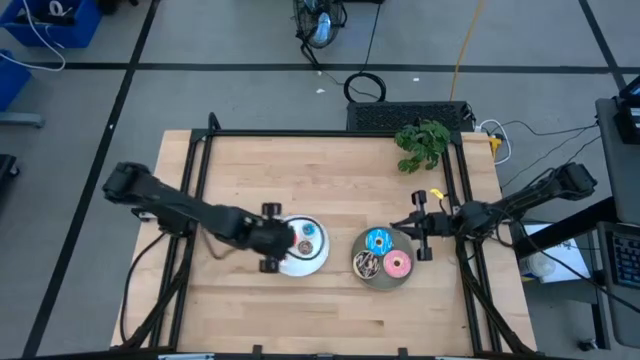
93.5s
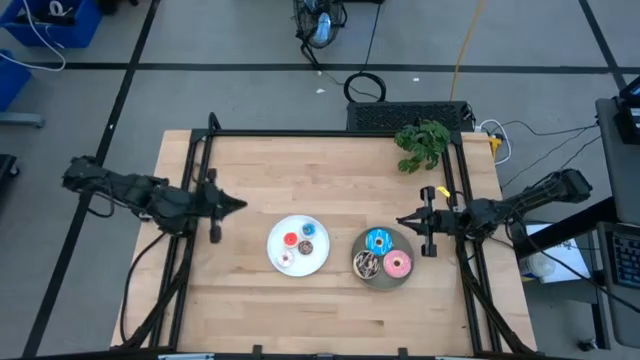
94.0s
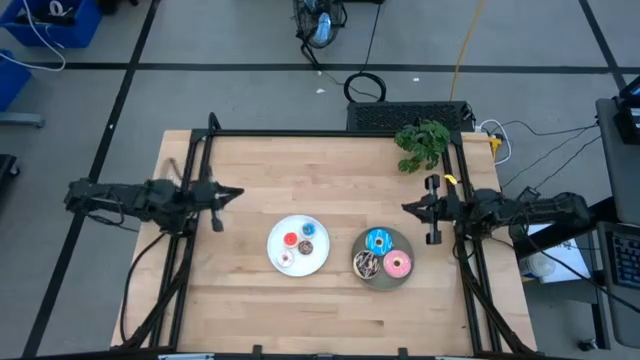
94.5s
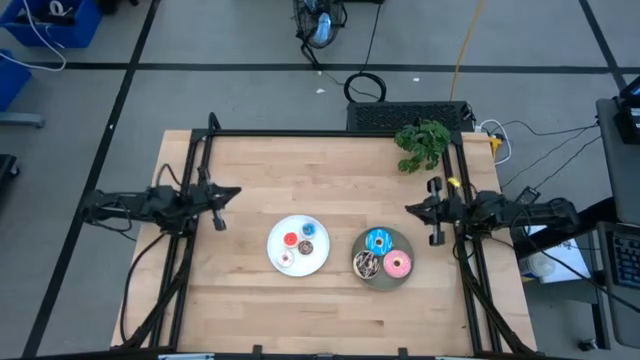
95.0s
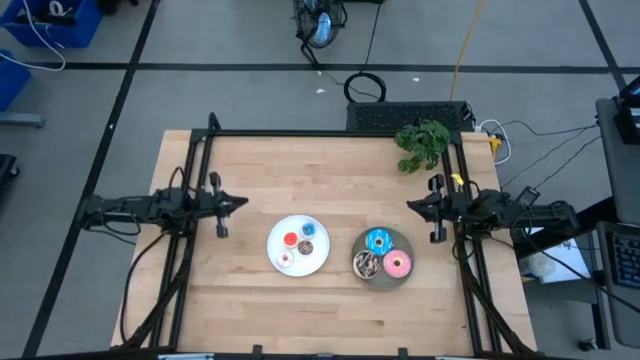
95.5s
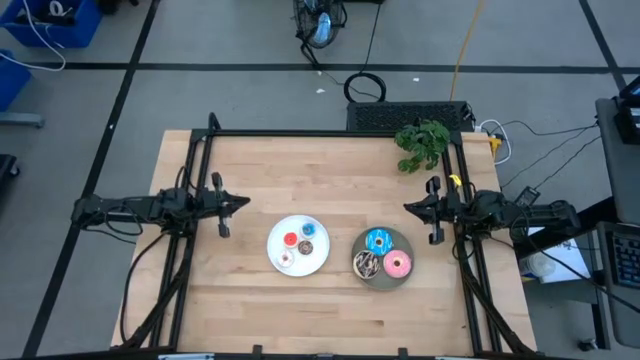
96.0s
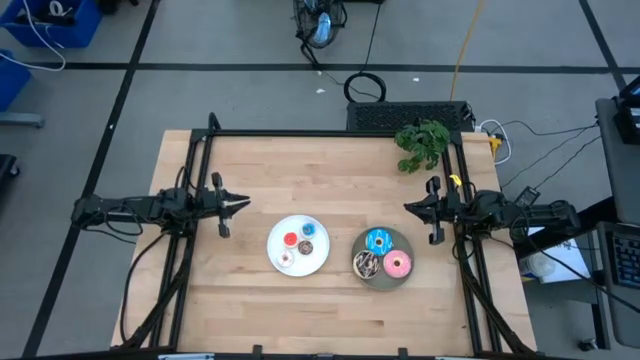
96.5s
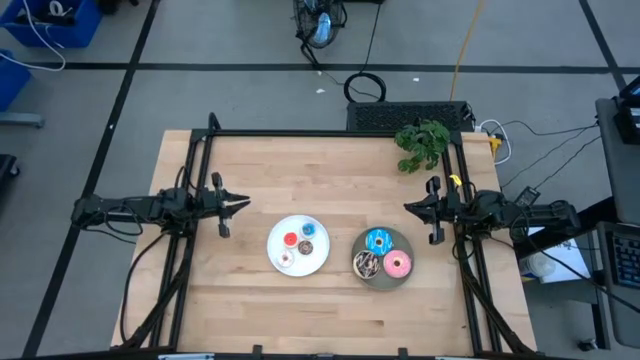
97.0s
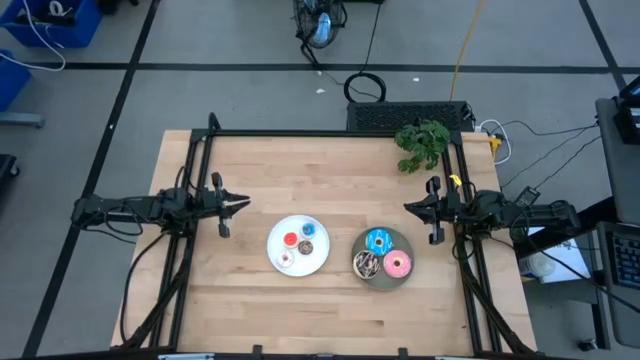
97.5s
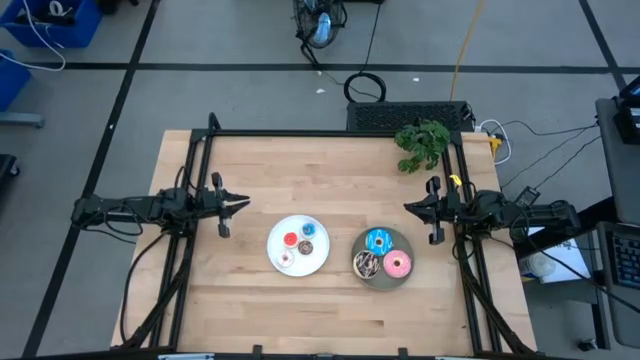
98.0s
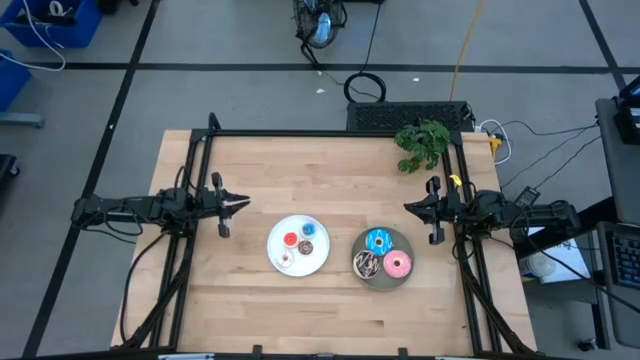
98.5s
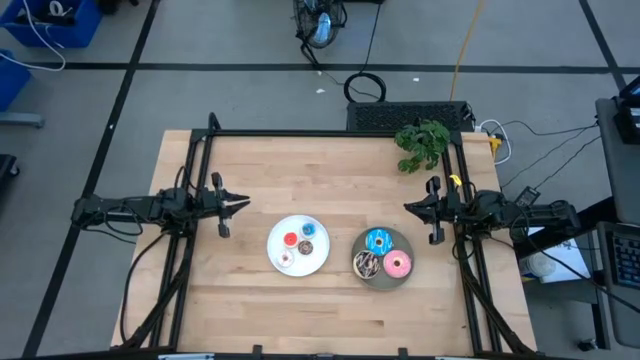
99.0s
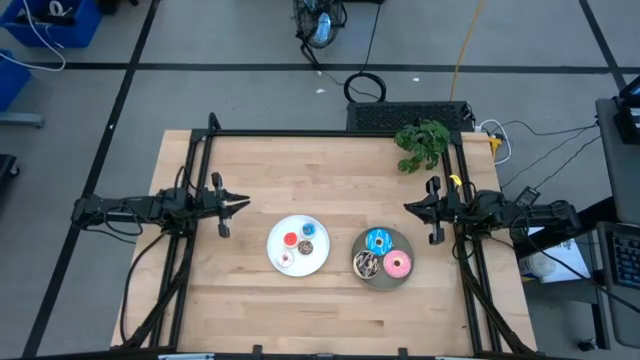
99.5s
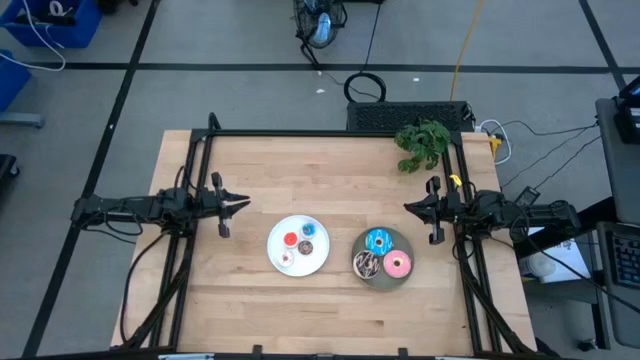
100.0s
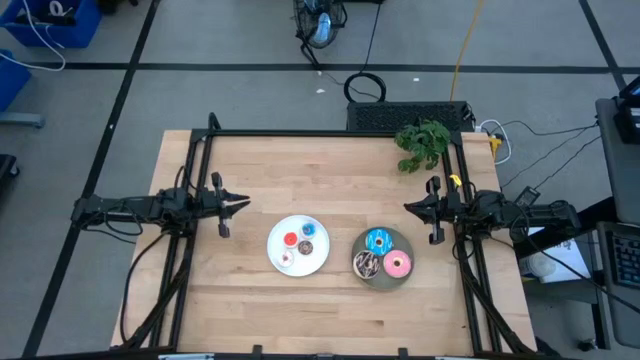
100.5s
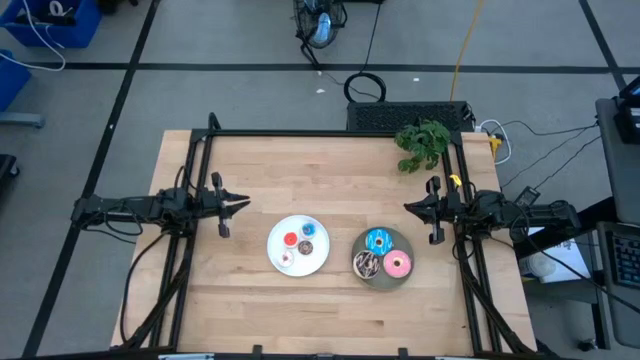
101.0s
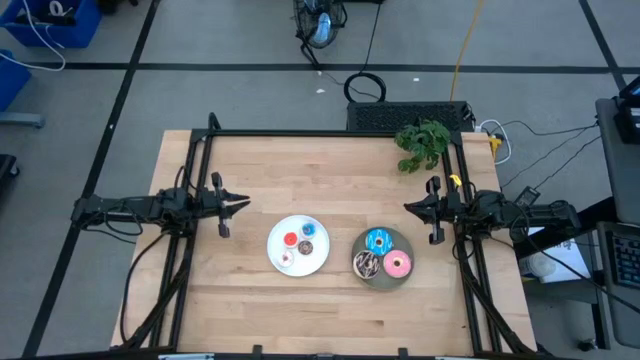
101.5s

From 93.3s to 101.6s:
Task: Pick & Place donuts
Return to Home Position

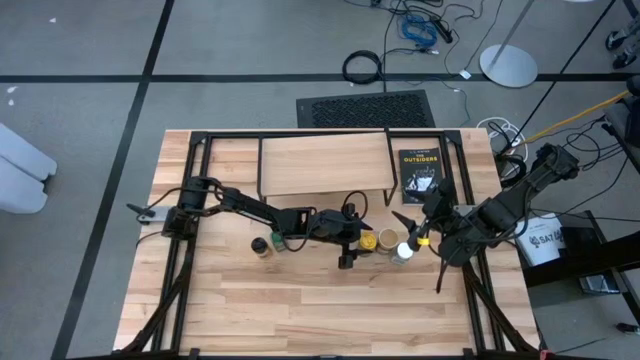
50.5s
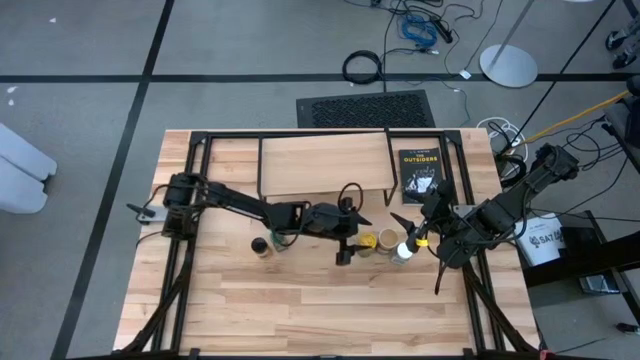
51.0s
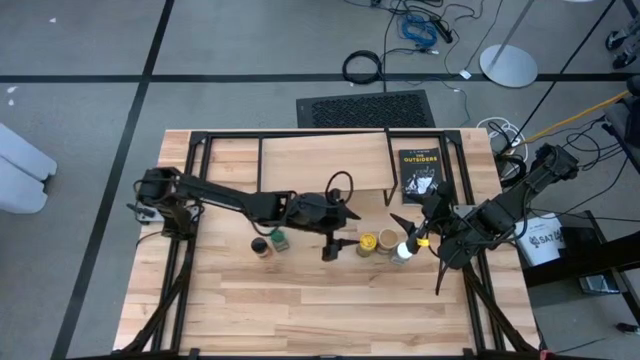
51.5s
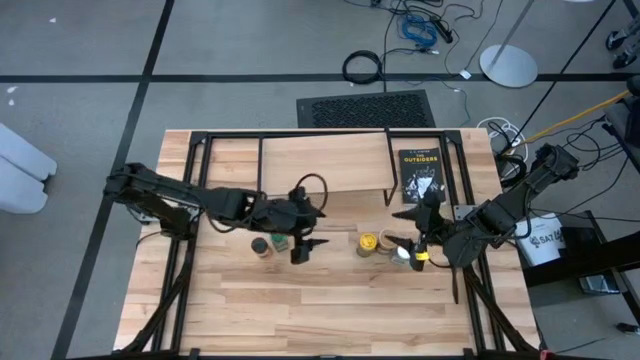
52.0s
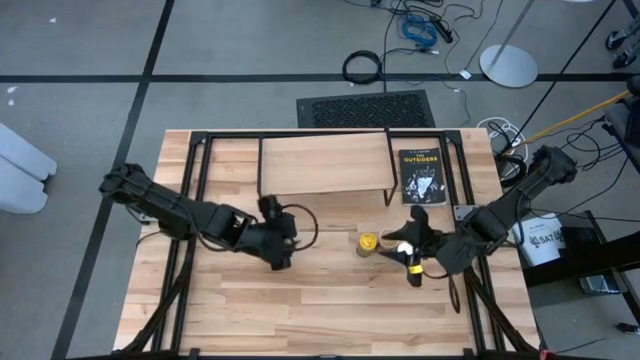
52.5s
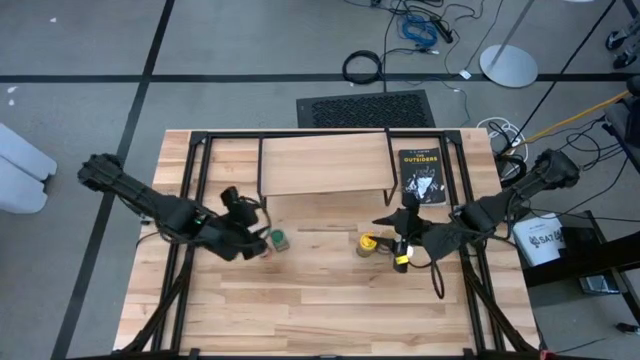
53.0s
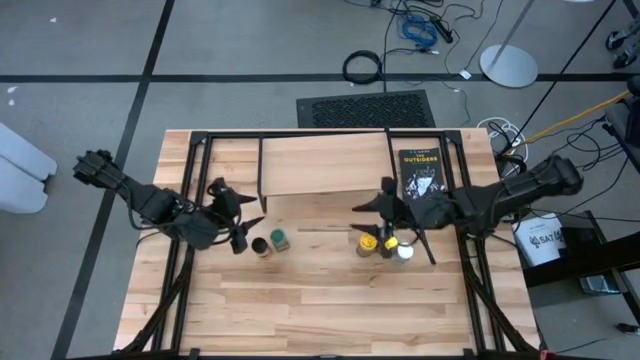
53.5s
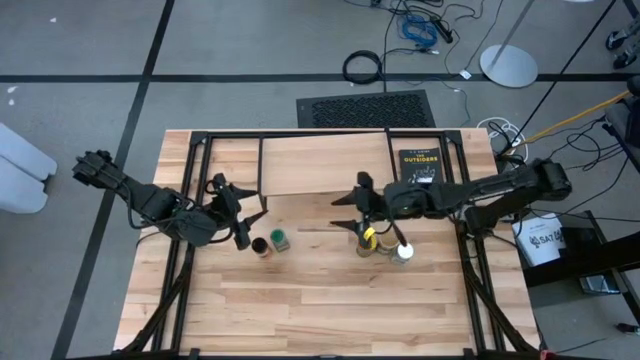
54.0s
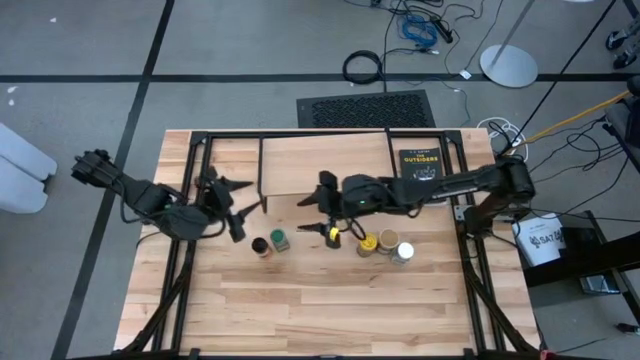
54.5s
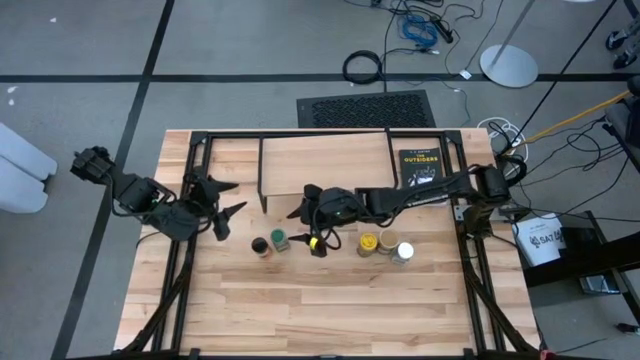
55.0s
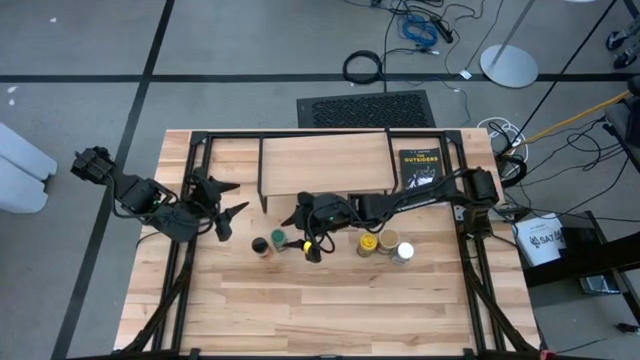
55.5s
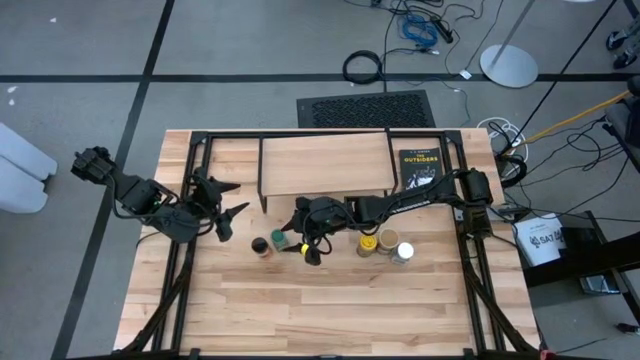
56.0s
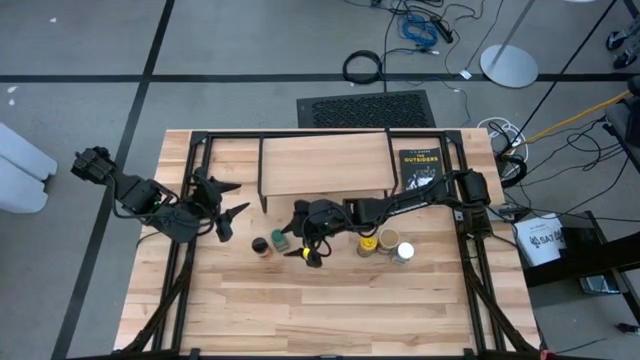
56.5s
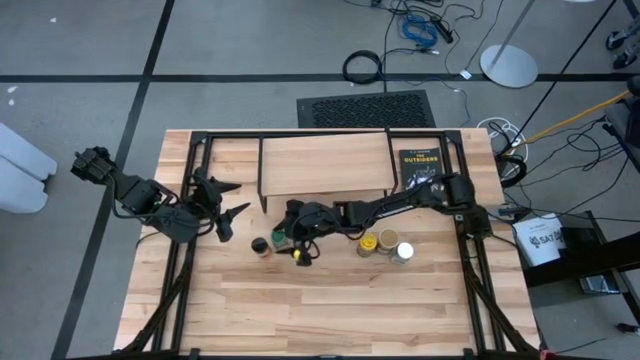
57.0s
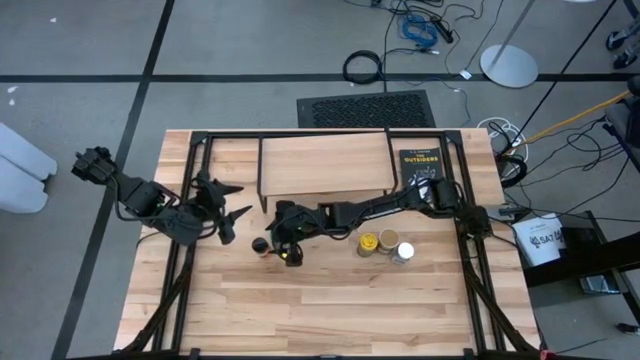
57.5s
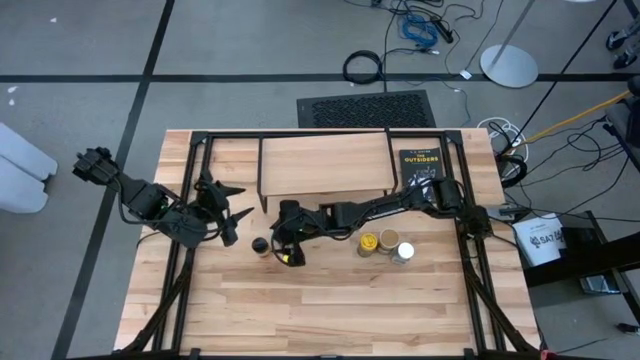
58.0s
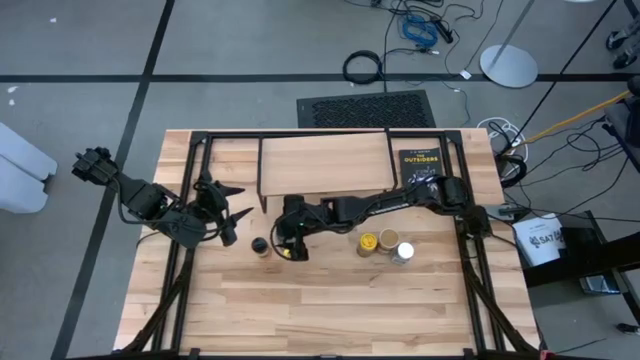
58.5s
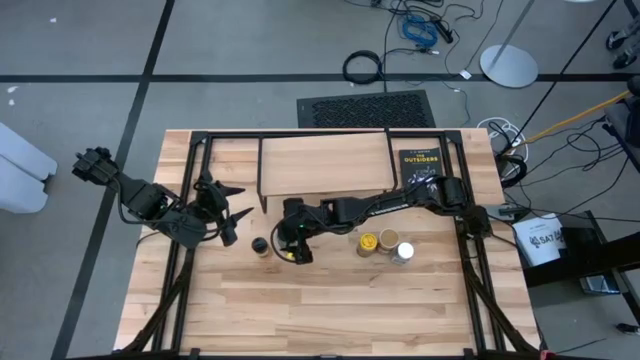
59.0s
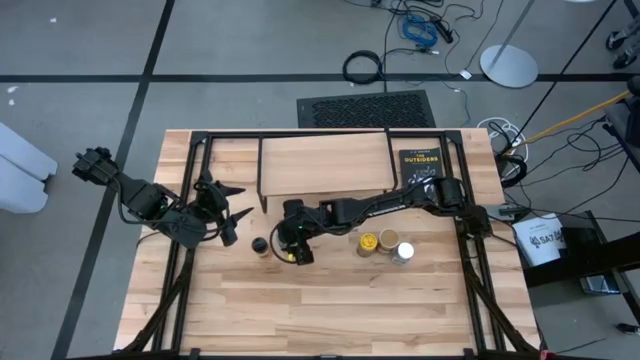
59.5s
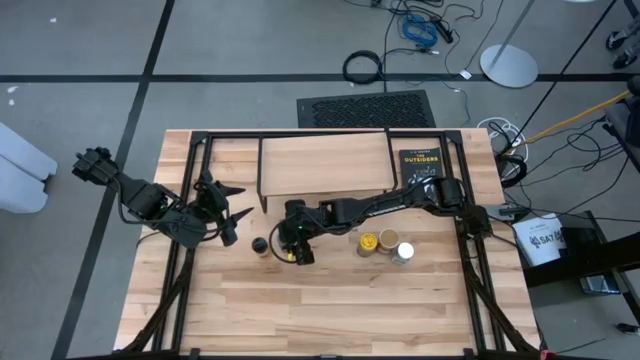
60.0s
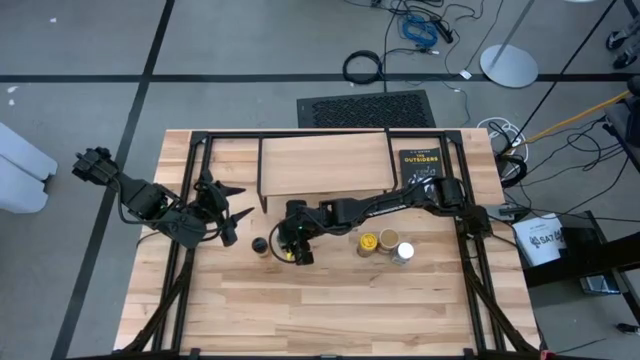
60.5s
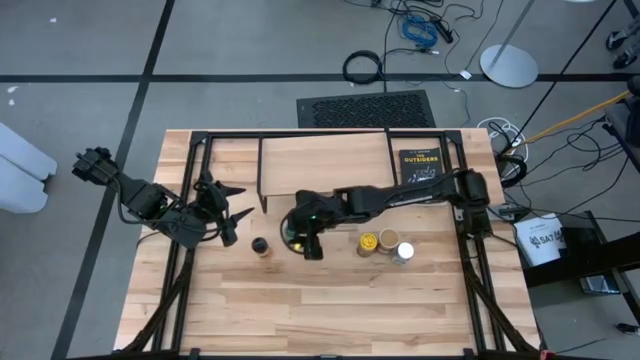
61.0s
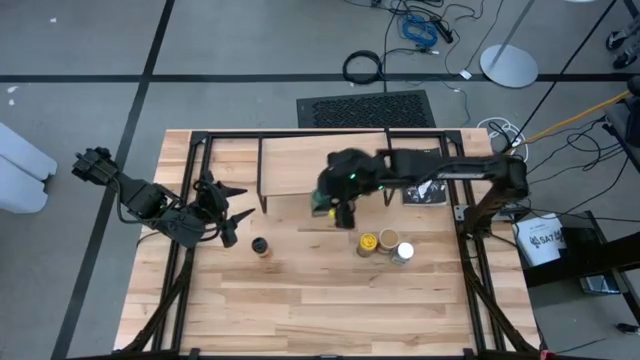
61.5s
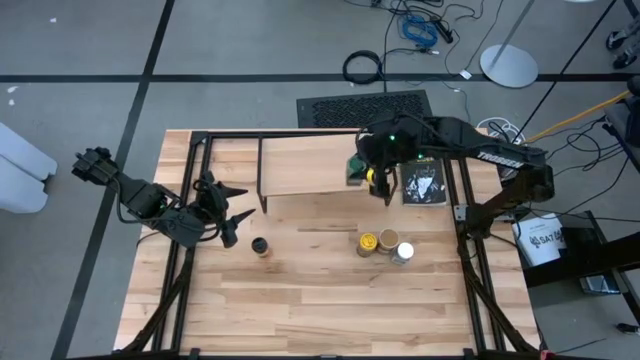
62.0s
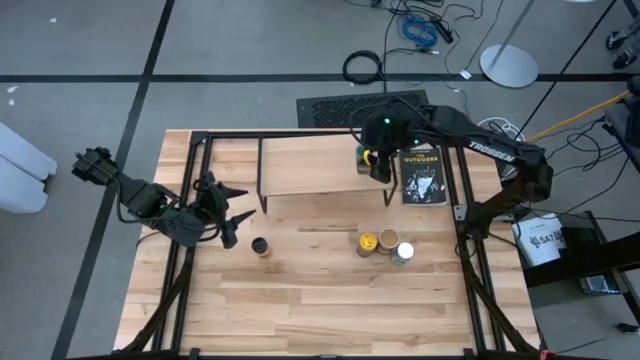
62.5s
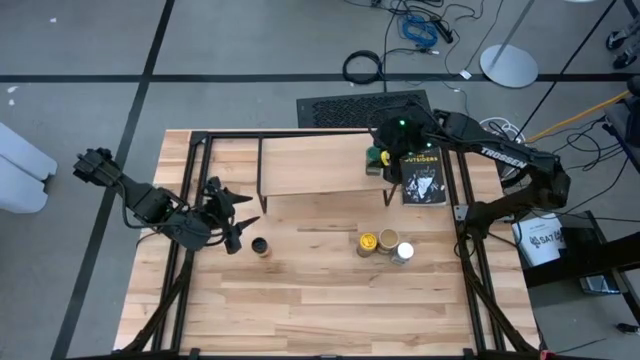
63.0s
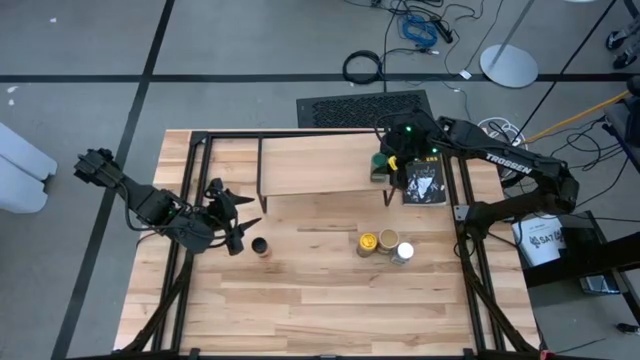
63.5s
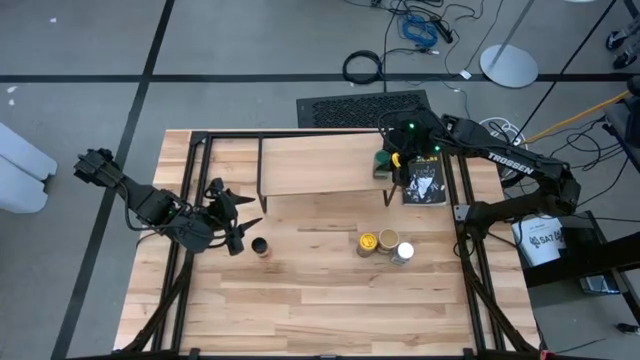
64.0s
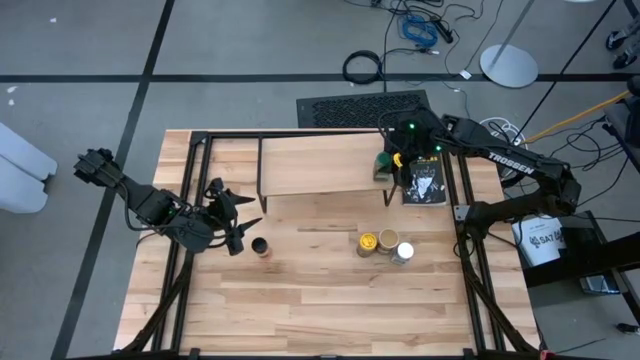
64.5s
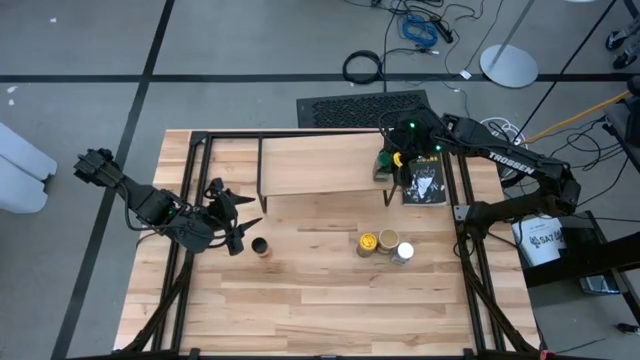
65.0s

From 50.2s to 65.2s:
Task: Shelf spices
Put the green seasoning bottle on the shelf
